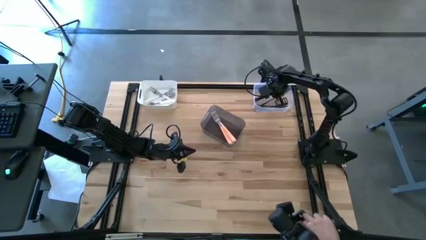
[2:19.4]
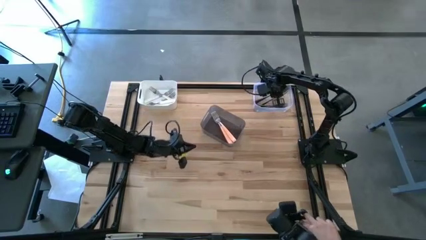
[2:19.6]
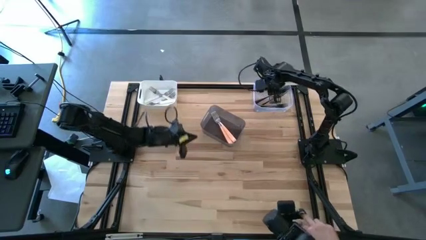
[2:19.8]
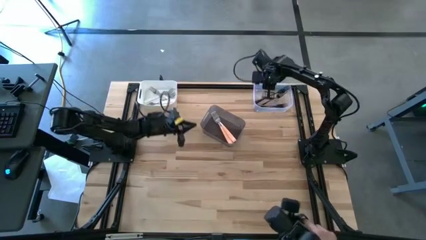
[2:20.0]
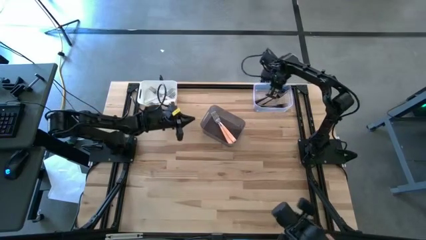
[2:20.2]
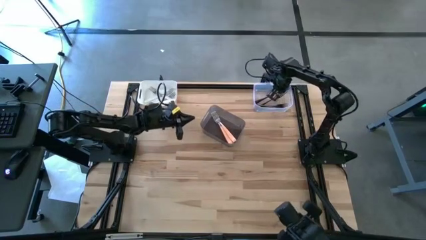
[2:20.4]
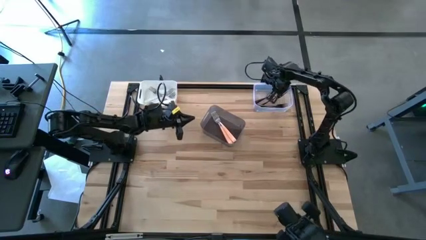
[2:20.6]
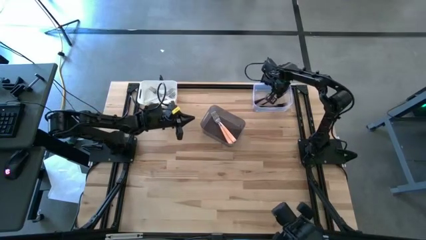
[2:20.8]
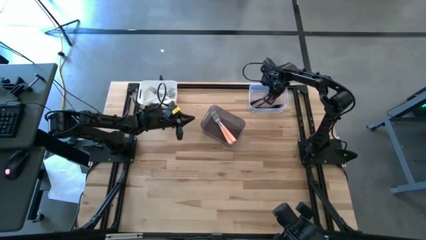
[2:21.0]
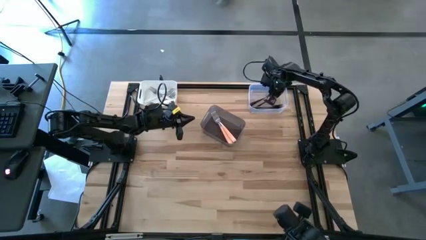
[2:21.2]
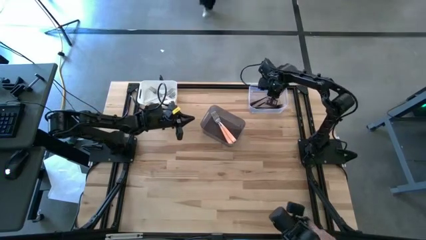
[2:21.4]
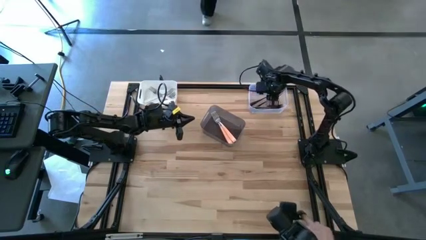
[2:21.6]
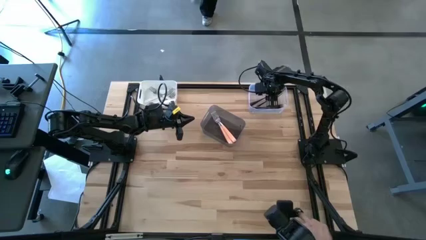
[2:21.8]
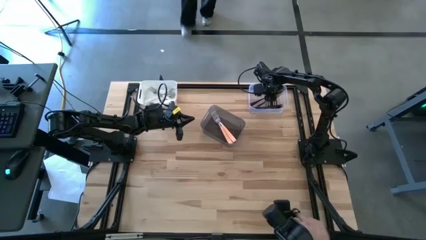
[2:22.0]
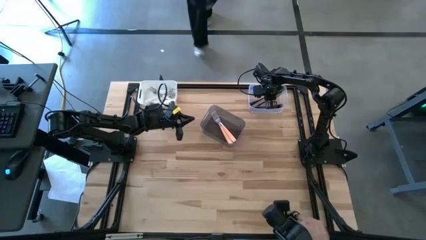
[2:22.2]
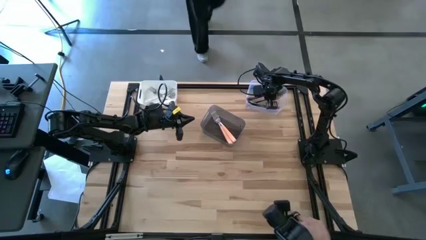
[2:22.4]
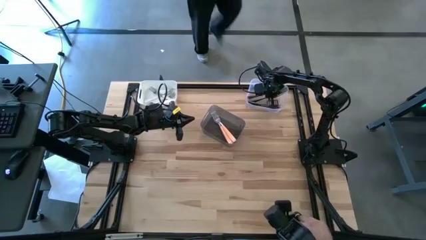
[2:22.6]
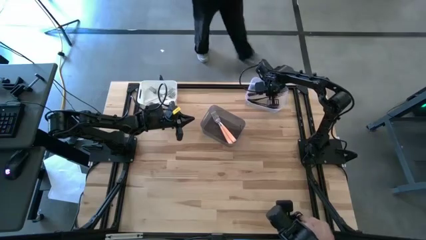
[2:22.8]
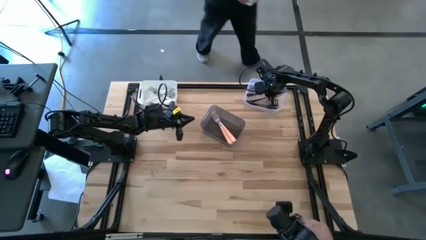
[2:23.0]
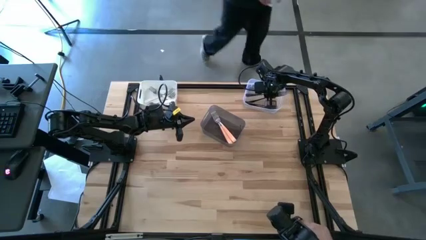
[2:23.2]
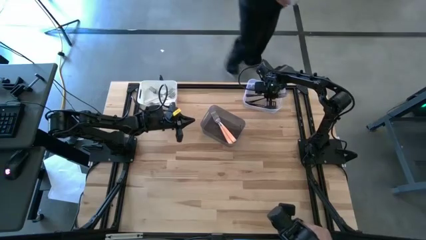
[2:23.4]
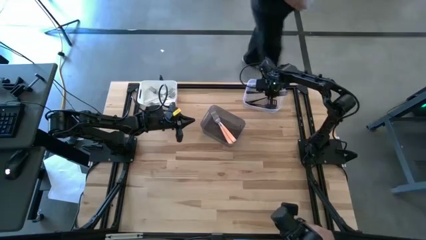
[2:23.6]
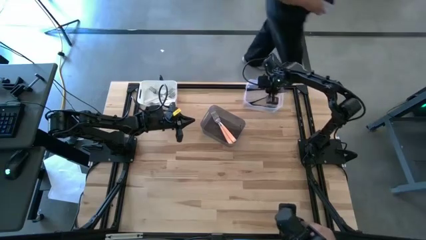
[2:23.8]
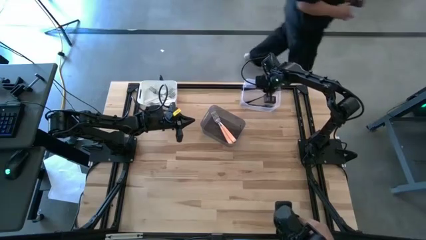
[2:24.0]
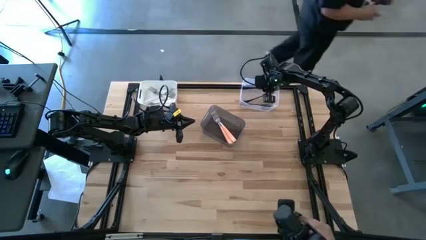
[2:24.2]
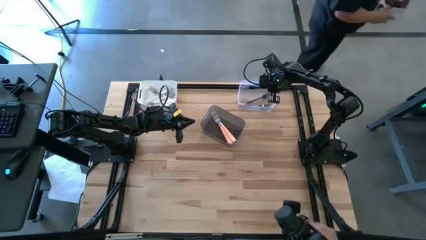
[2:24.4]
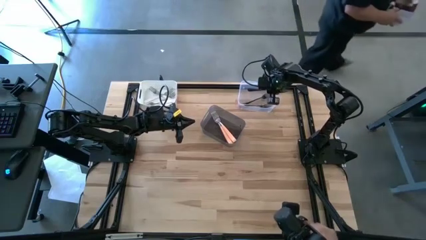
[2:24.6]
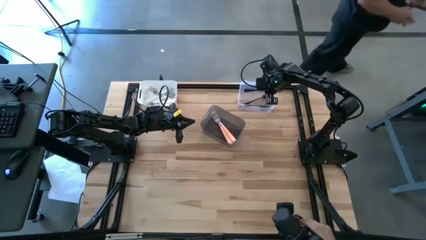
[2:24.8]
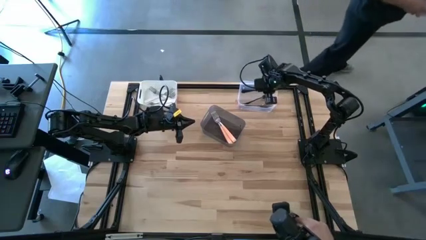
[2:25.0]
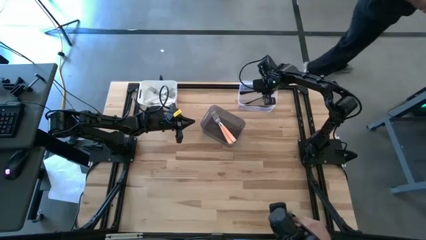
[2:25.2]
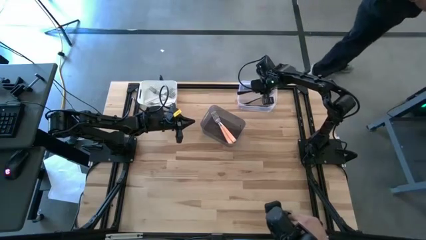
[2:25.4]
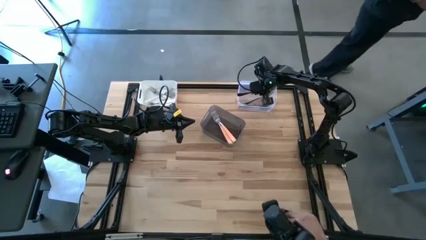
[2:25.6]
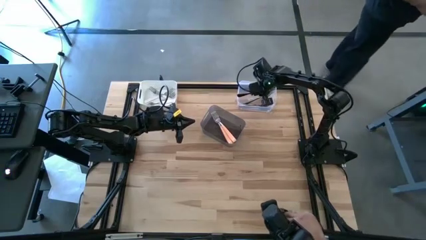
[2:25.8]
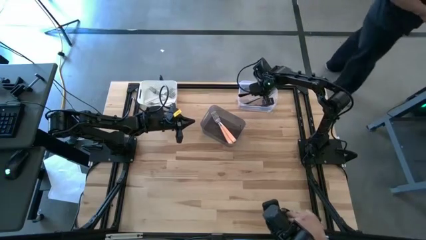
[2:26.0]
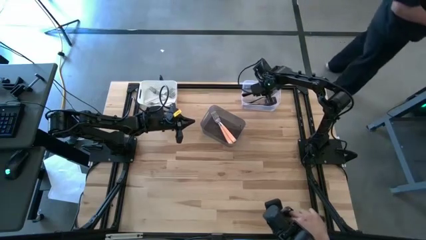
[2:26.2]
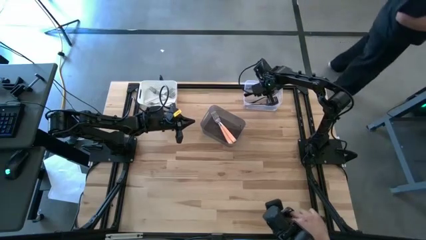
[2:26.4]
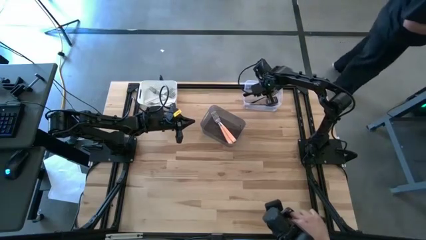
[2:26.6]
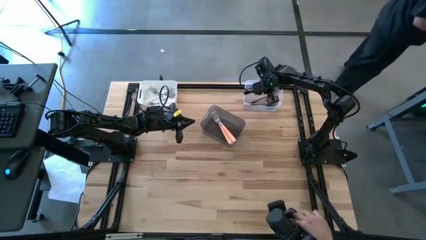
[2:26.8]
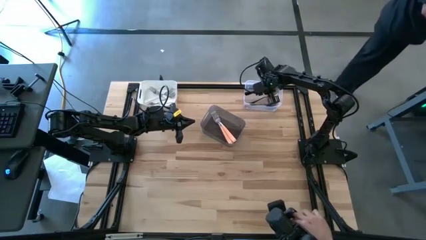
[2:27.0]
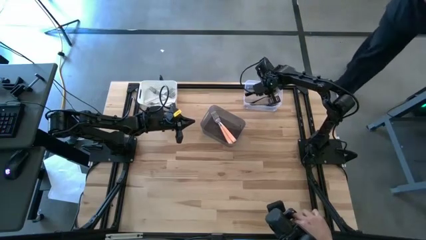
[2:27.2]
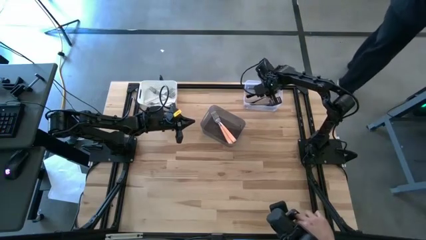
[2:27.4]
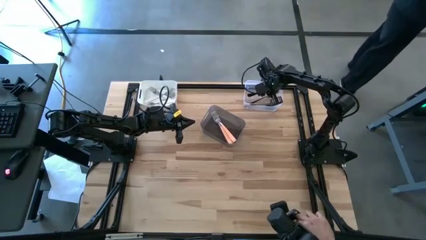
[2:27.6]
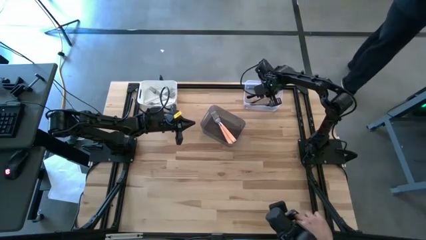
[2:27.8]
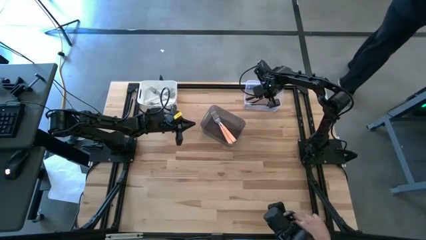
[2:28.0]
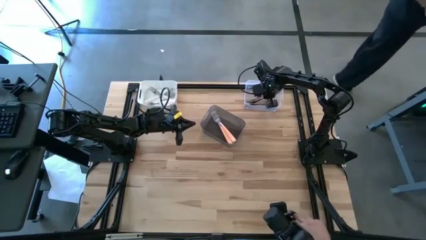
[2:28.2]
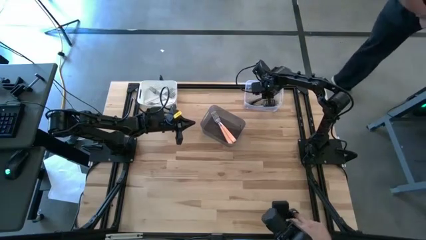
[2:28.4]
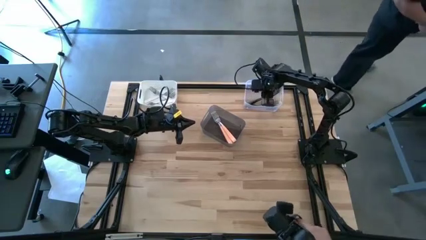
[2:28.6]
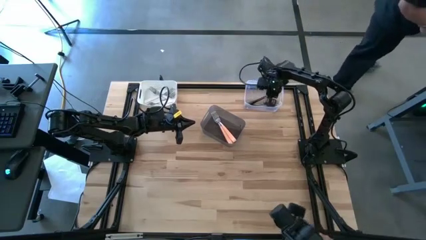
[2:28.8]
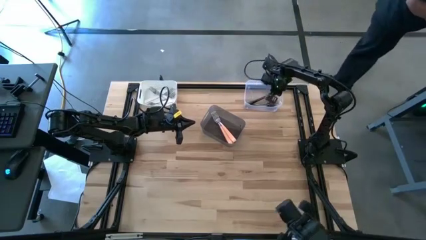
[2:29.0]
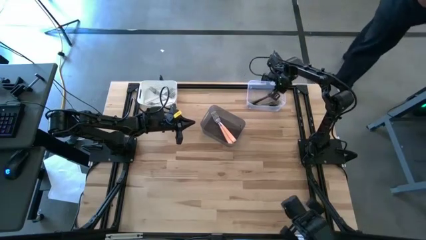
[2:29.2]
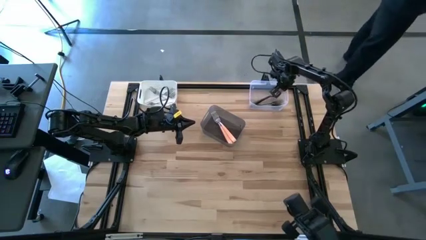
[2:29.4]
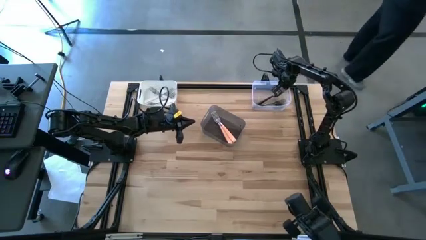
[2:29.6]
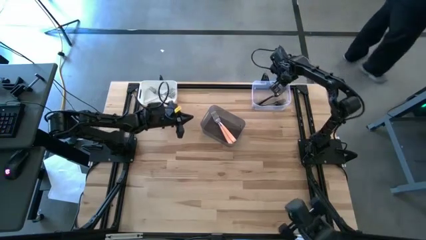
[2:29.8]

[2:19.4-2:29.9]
Task: Sort silverware by color (type)
Put the black fork into the transparent bin

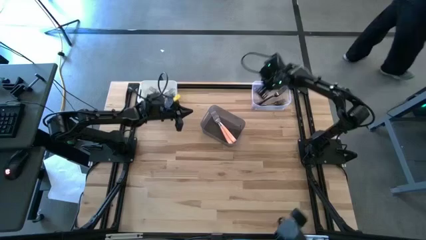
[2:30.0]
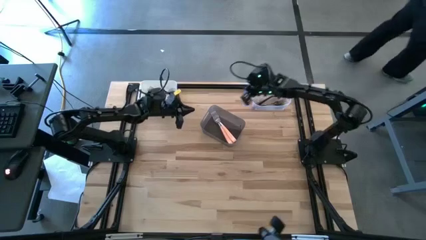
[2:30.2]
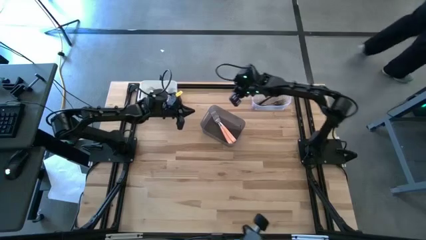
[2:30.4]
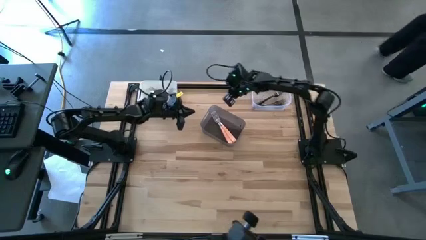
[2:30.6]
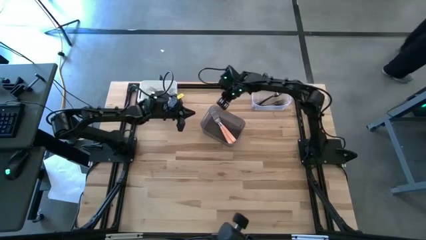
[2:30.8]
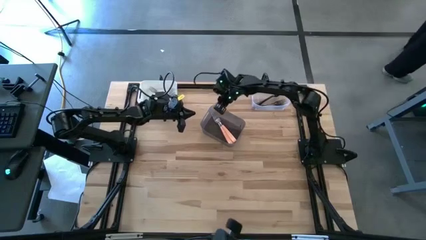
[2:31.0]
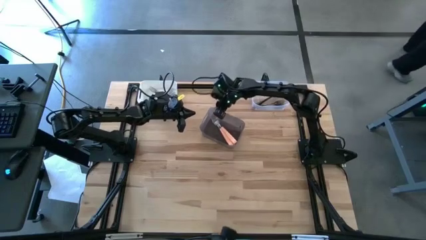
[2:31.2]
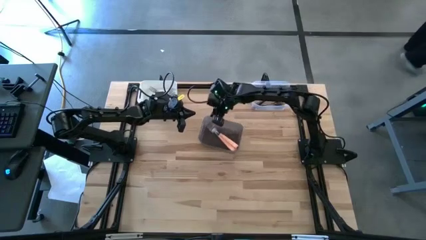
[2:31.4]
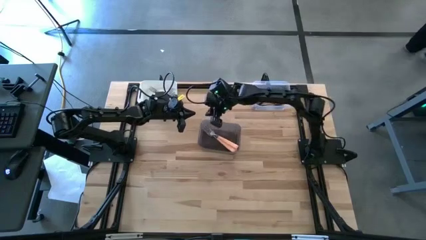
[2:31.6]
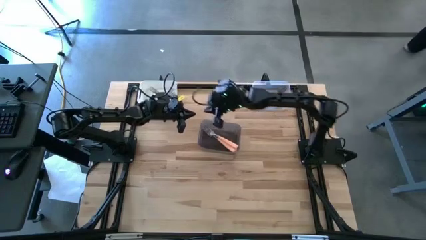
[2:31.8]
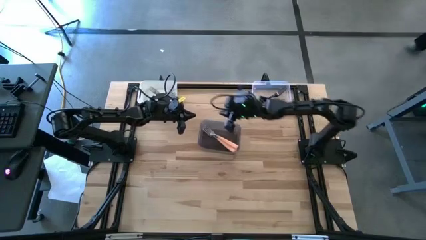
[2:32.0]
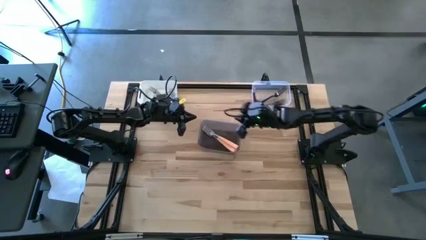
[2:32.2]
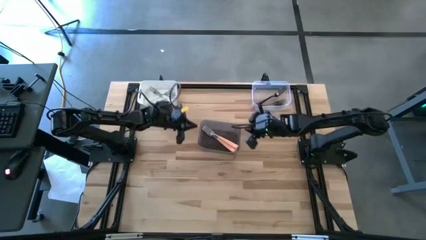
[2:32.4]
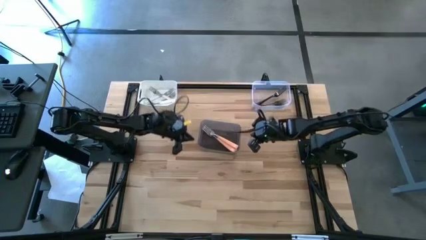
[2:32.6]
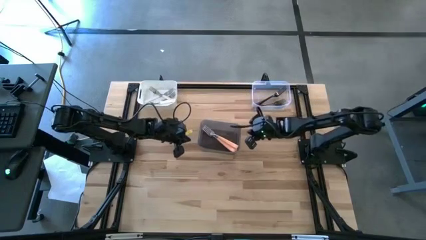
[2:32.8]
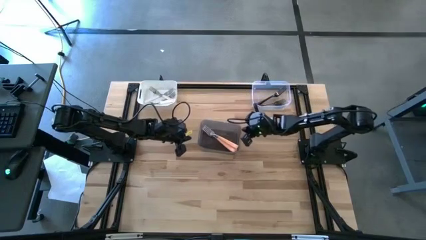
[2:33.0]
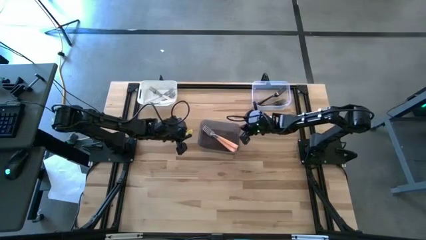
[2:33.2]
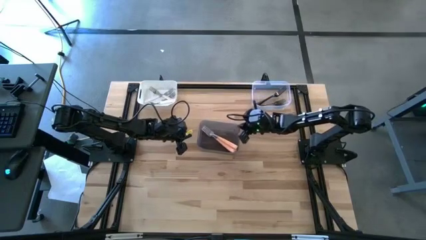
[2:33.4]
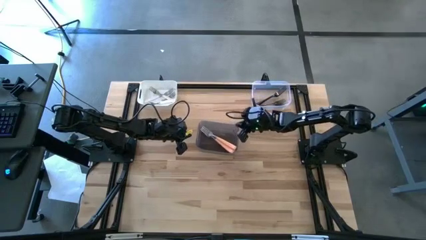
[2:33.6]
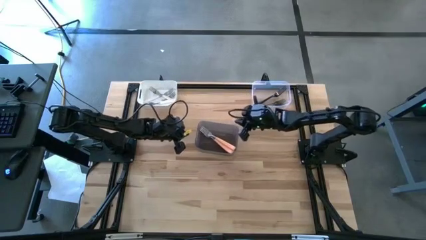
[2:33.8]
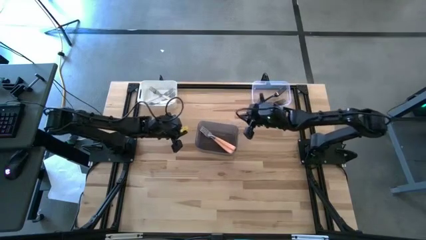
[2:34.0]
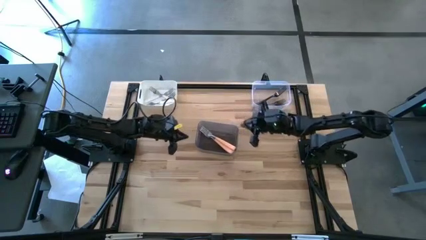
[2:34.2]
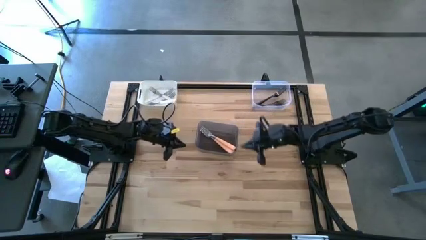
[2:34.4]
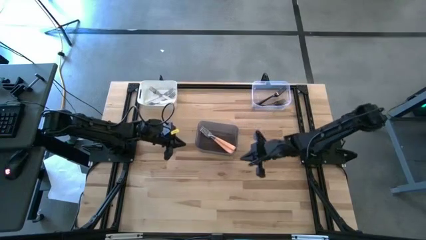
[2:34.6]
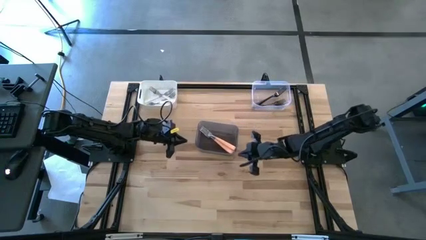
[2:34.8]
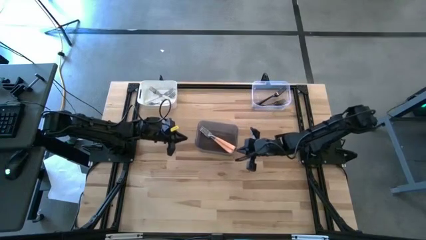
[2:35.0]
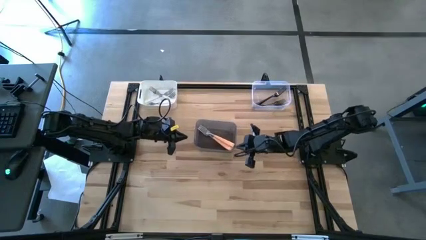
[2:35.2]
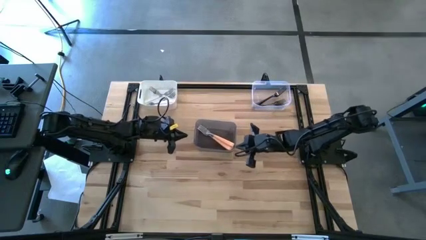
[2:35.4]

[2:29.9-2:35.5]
Adjust the black bin
